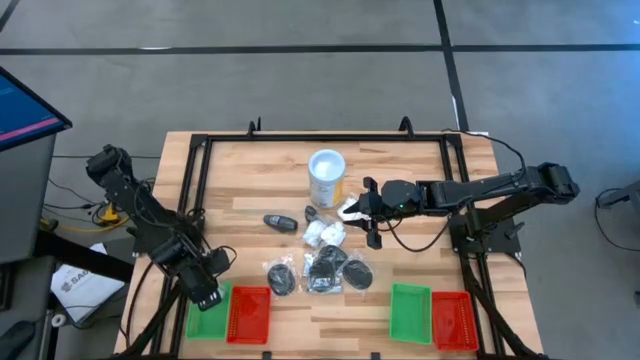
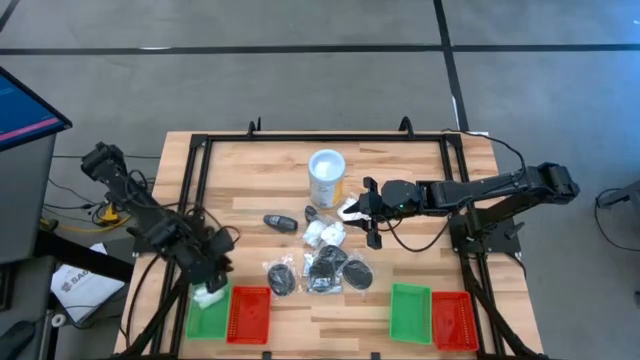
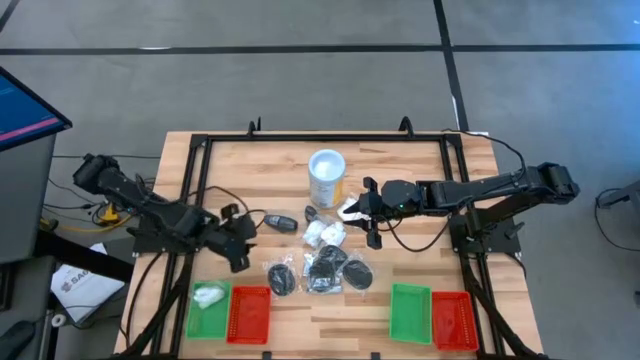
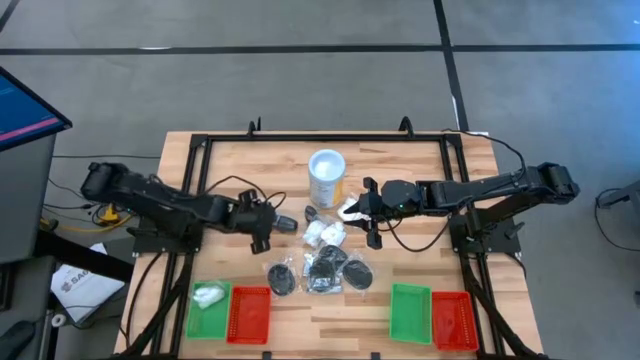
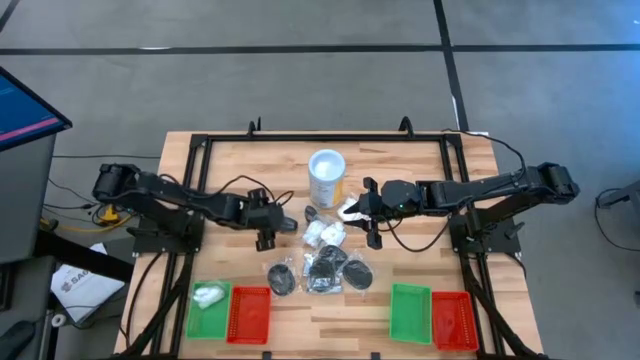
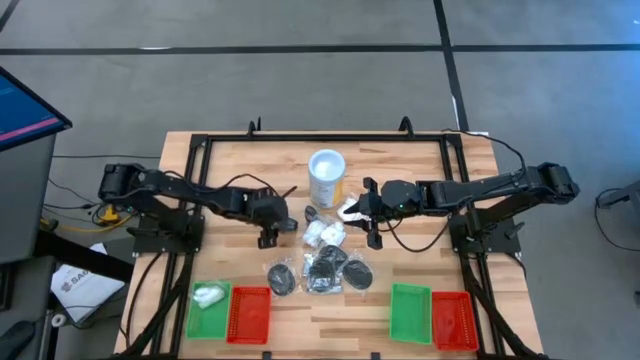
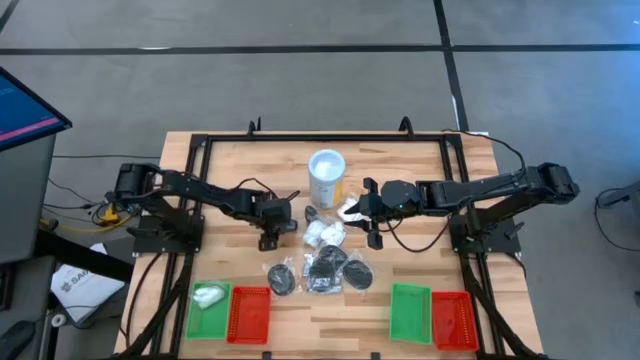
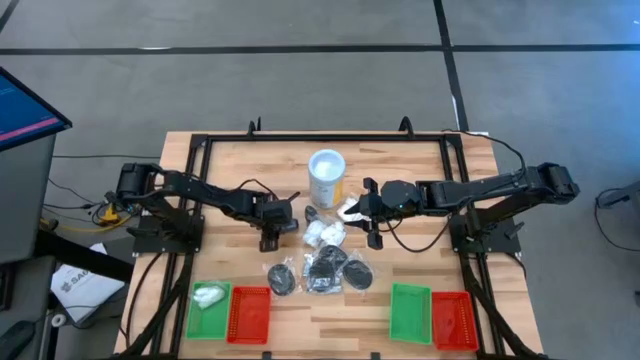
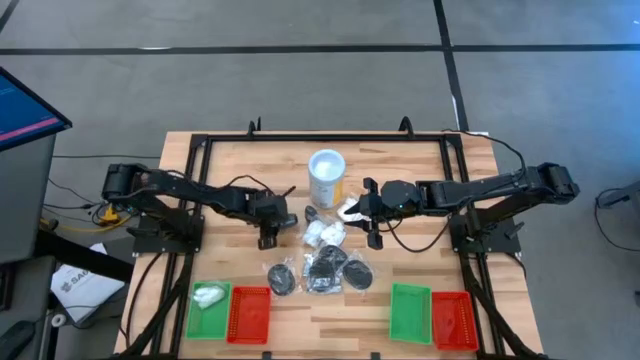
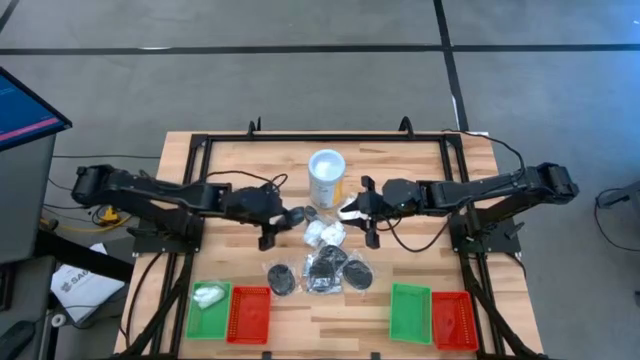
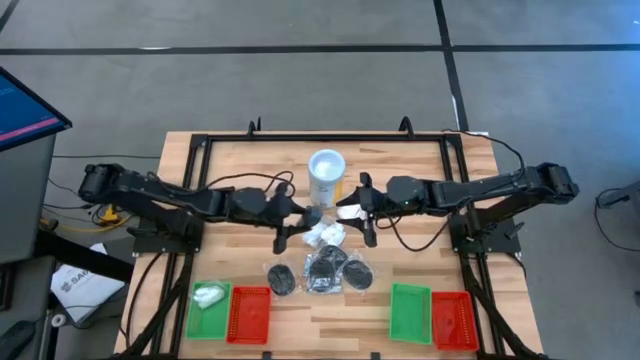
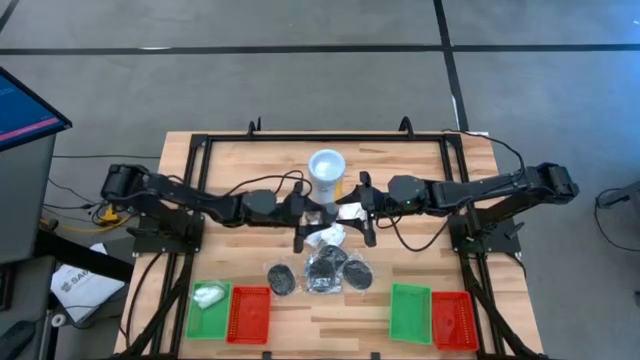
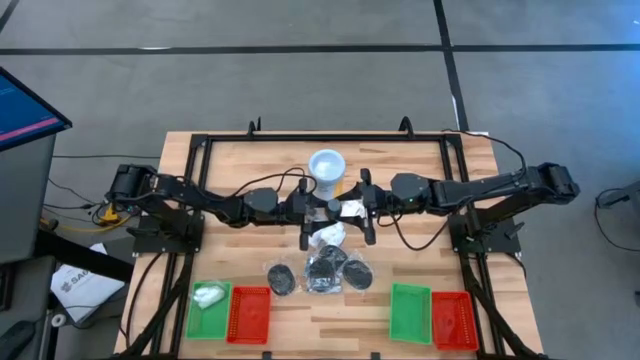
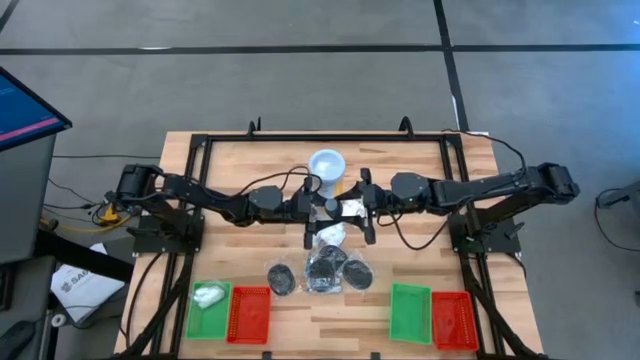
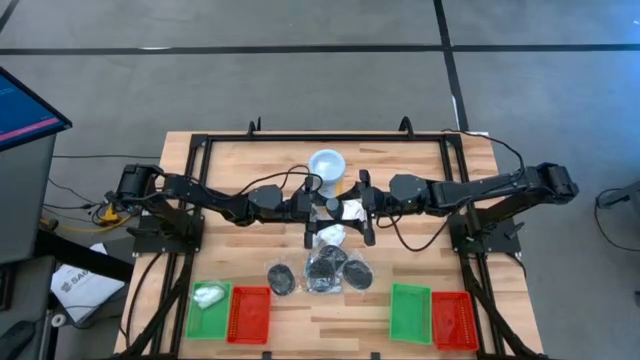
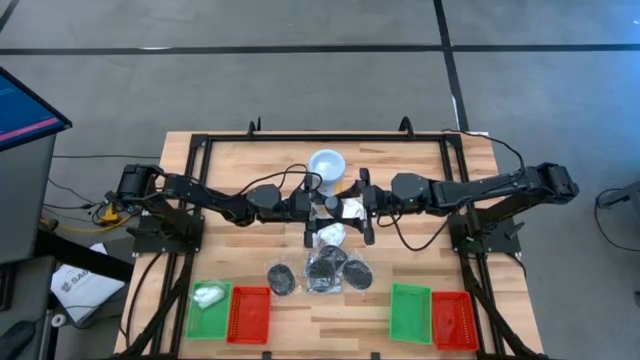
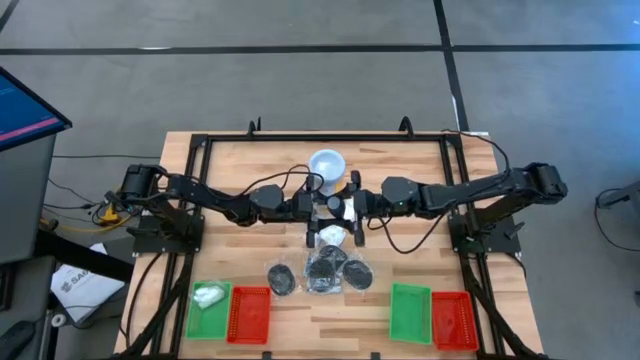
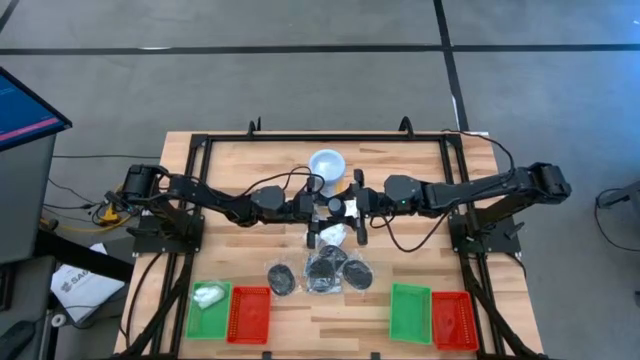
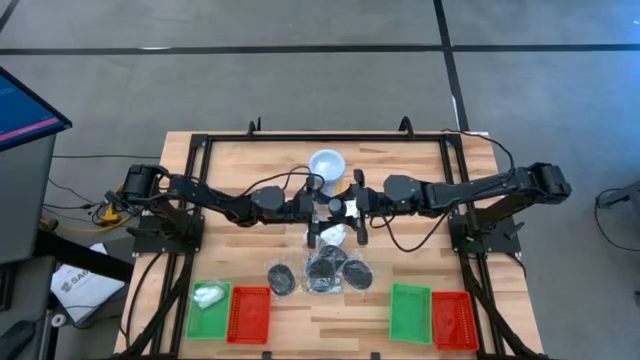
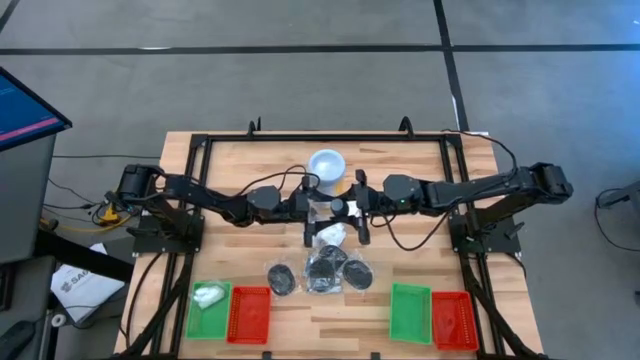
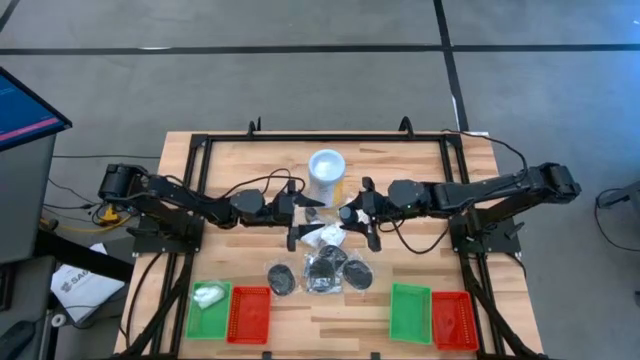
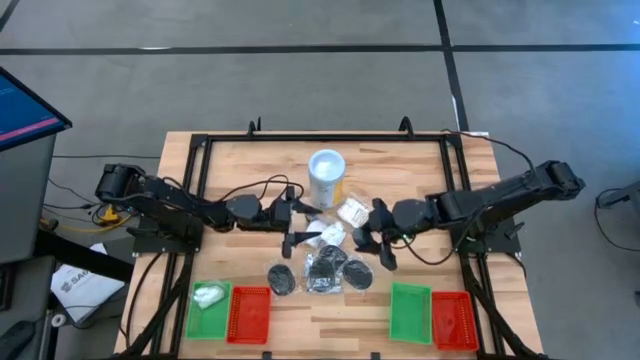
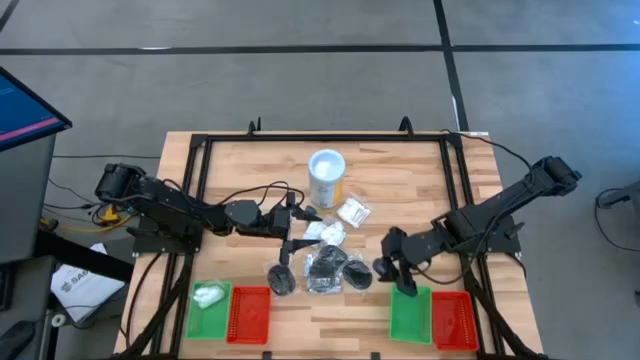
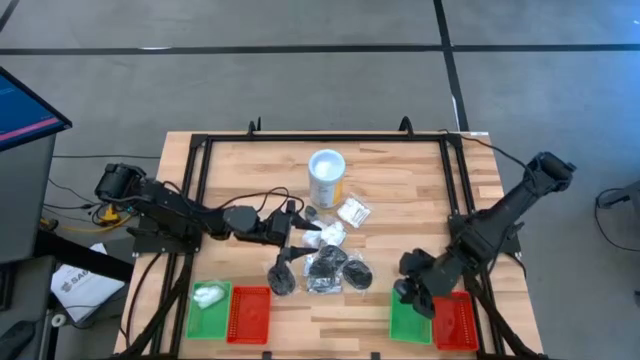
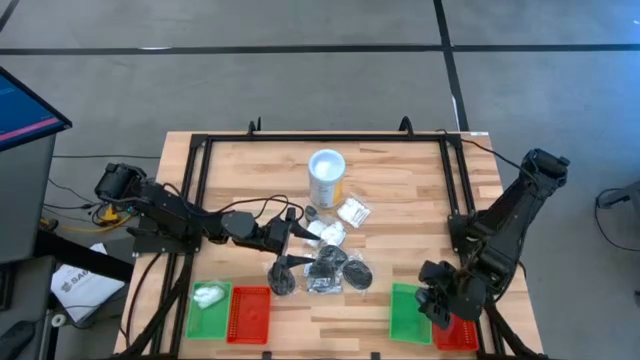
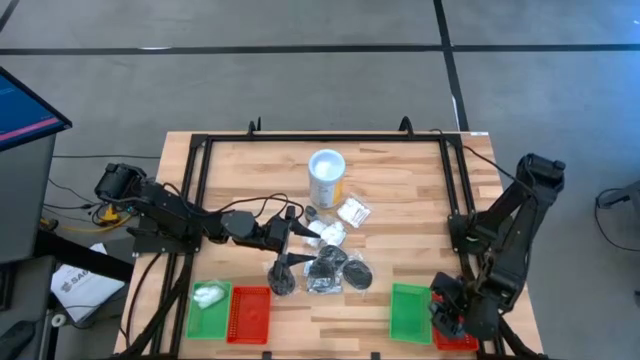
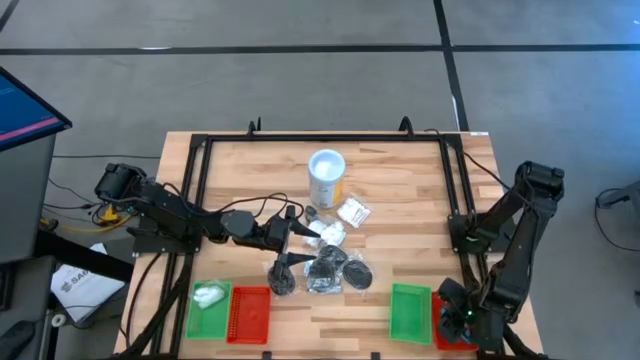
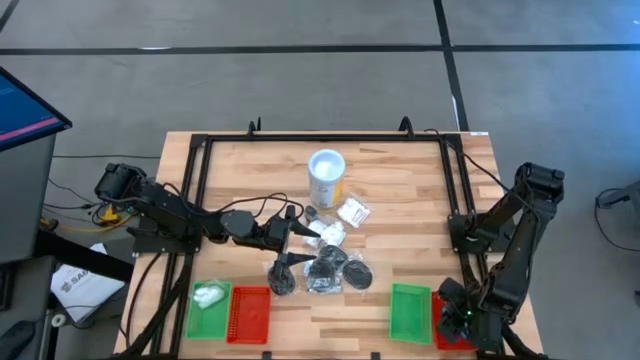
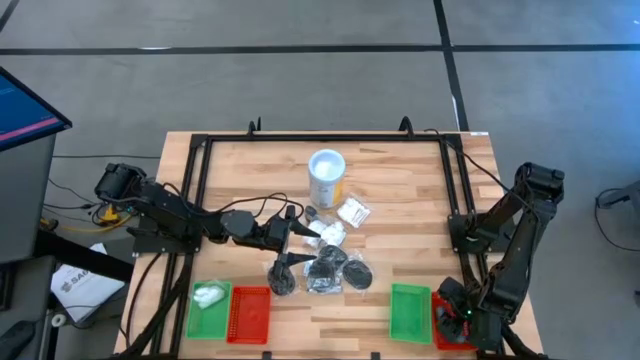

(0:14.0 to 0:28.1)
Task: Pick & Place Travel size toiletries
Put the deodorant into the right red bin

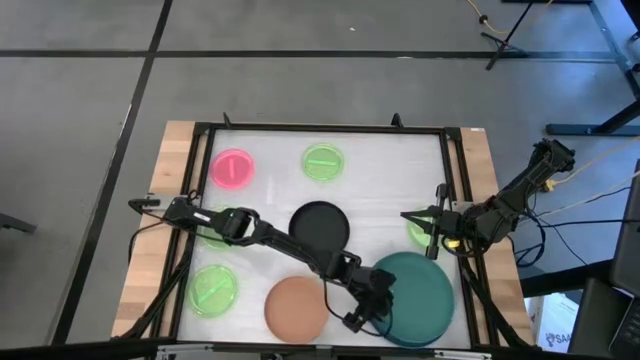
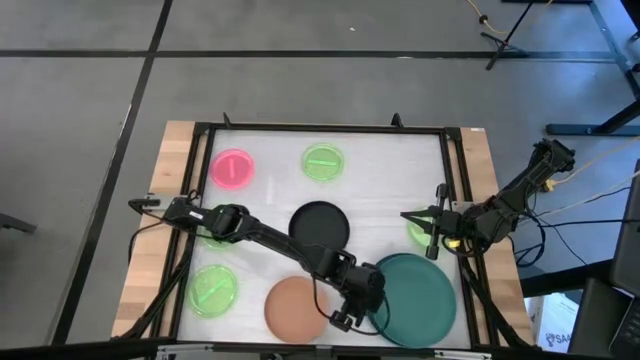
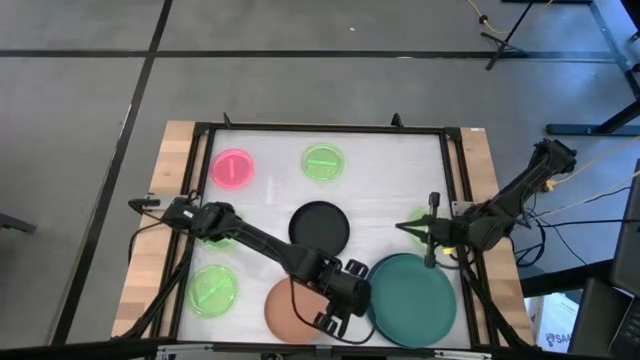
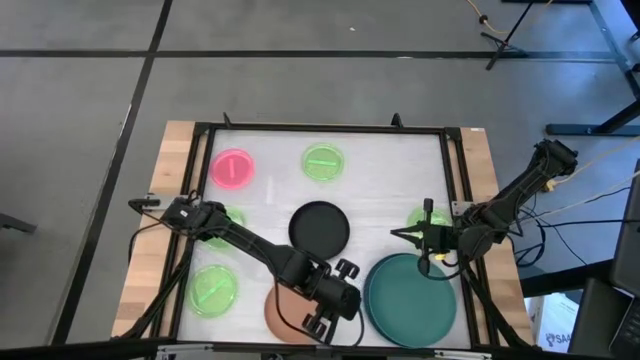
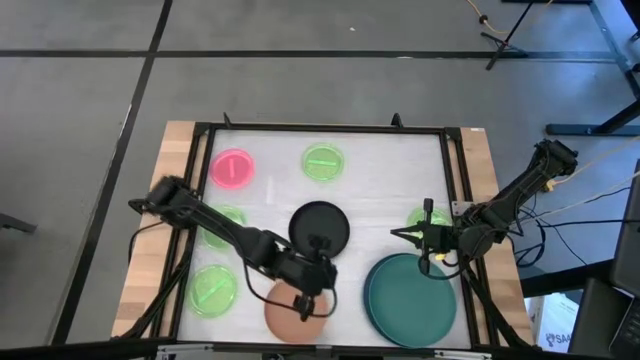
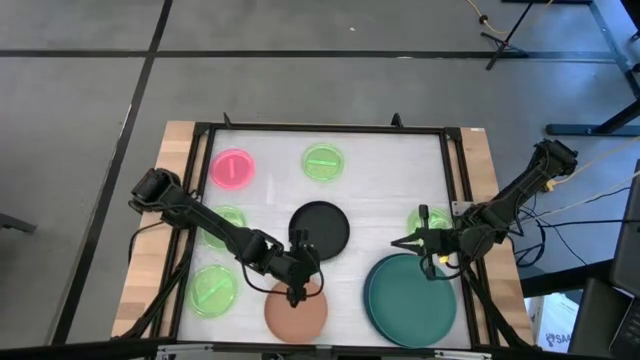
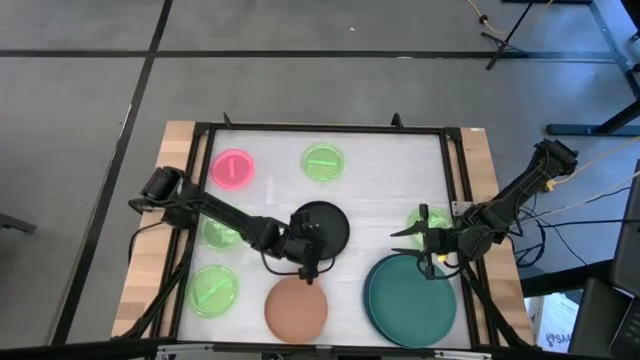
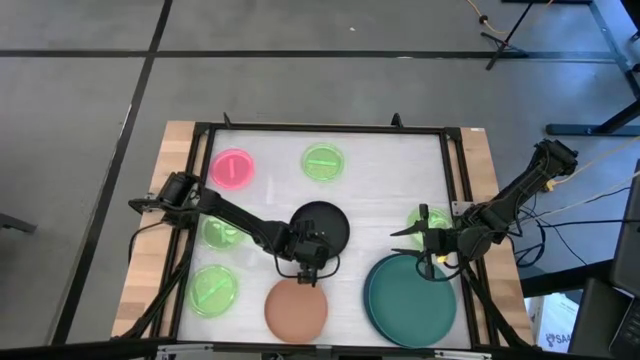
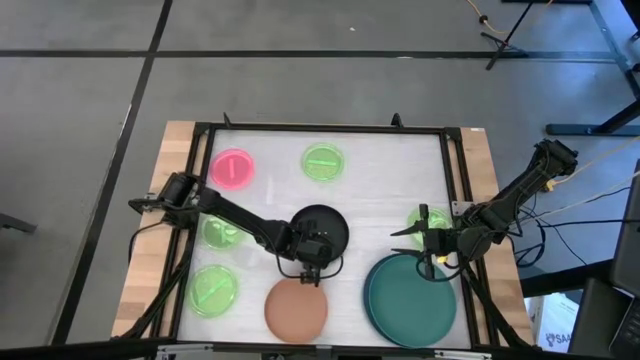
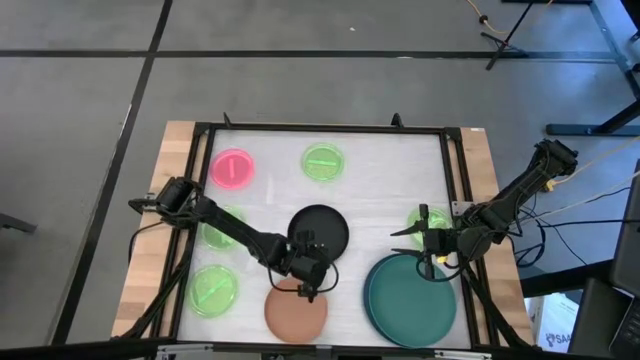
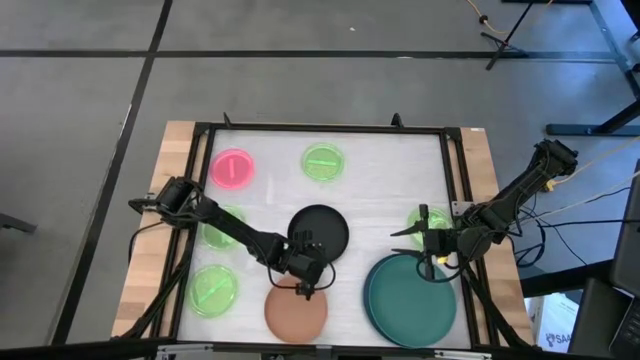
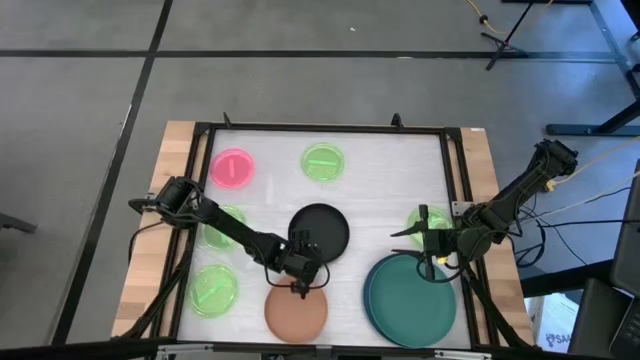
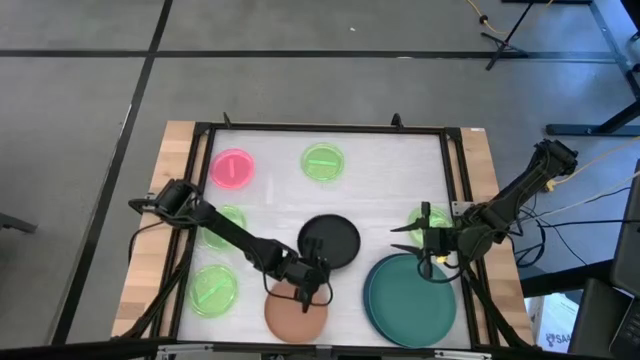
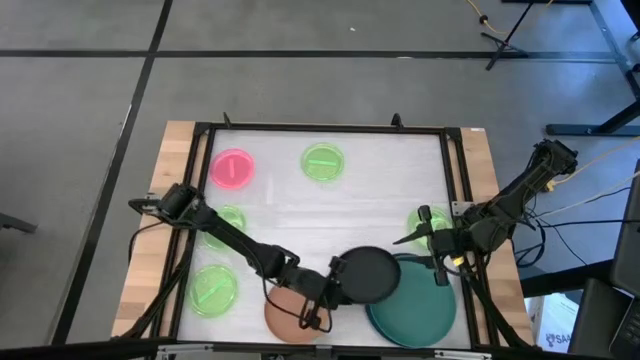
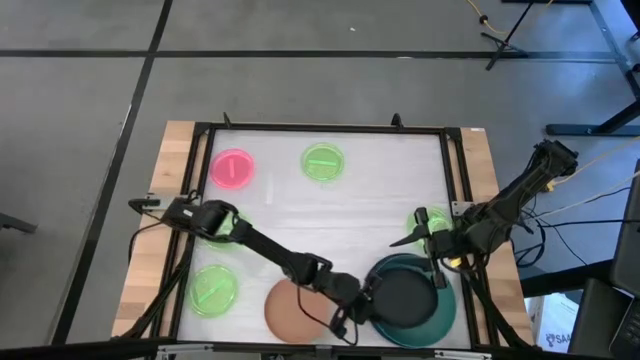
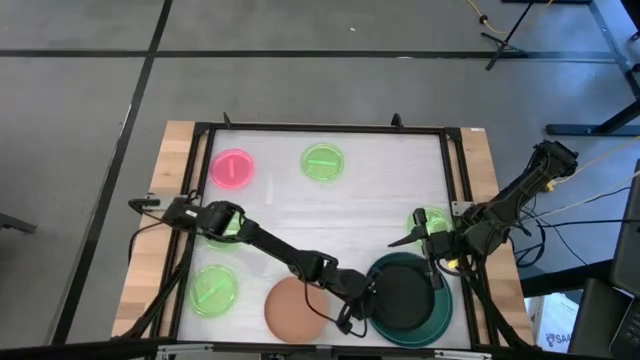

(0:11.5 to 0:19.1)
Task: Stack plastic plates
Stack the black plate on top of the dark green plate
